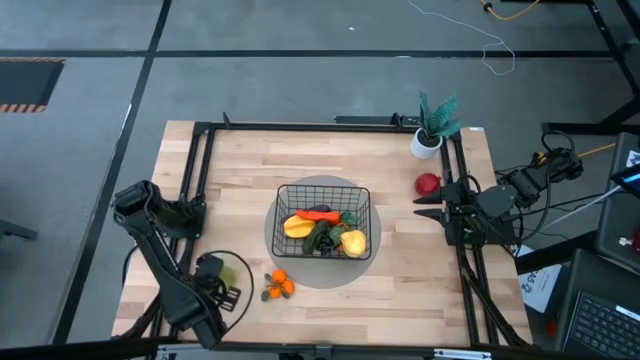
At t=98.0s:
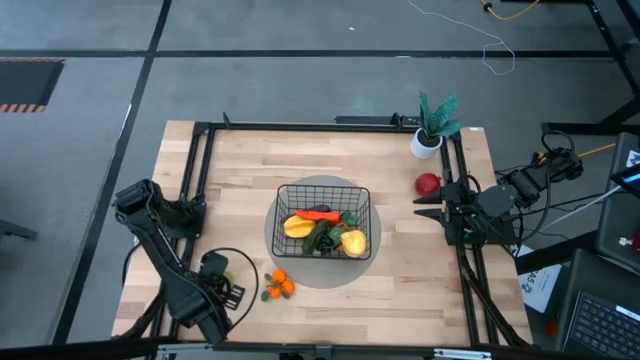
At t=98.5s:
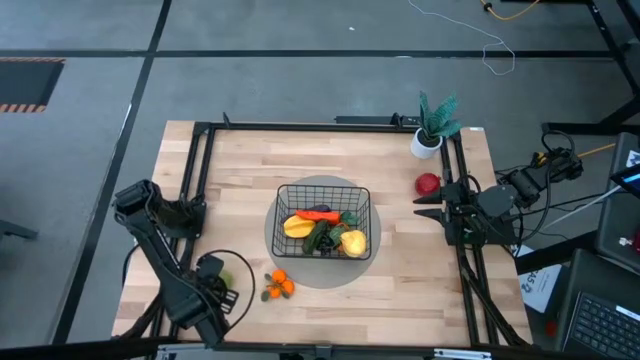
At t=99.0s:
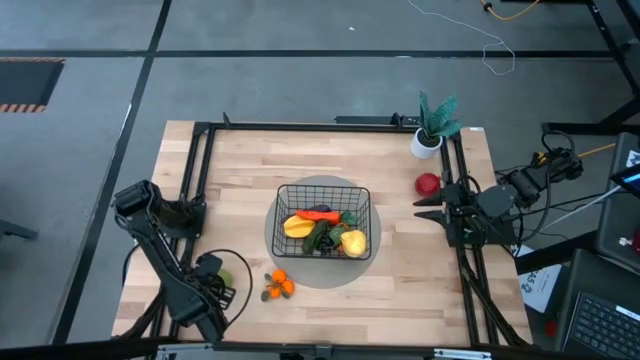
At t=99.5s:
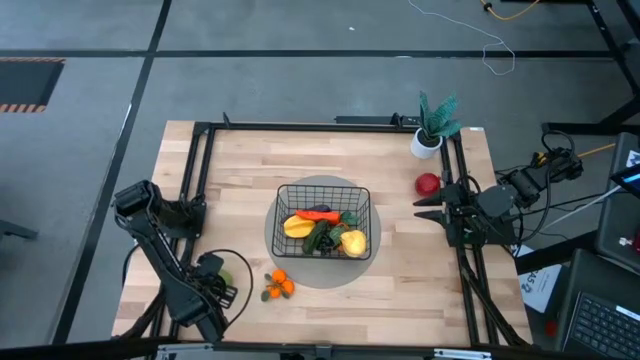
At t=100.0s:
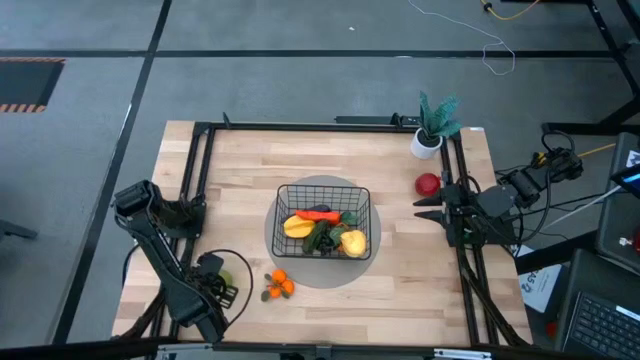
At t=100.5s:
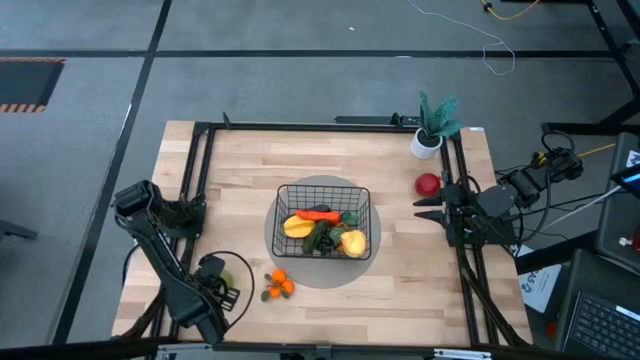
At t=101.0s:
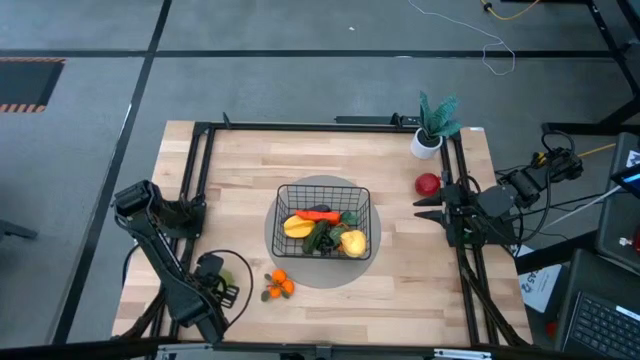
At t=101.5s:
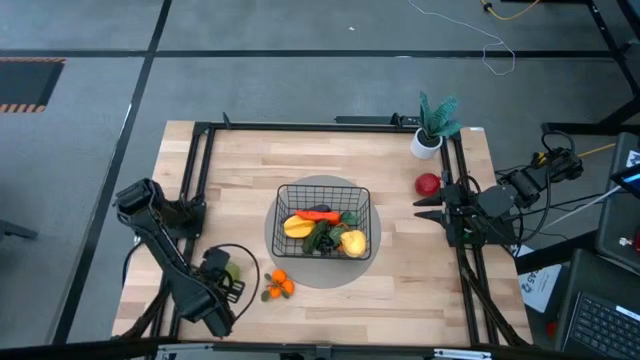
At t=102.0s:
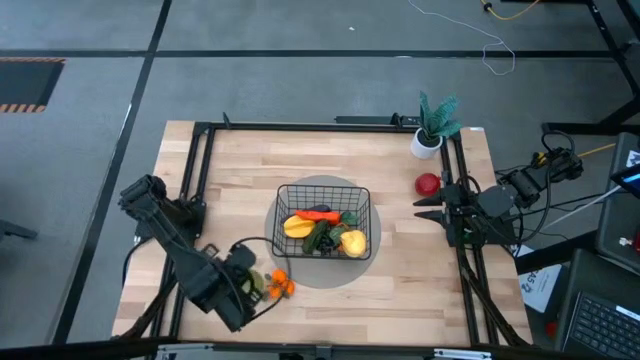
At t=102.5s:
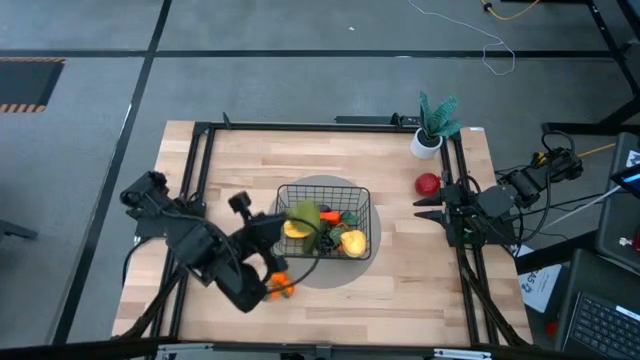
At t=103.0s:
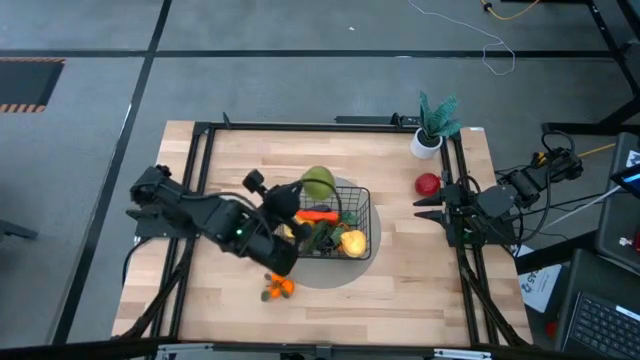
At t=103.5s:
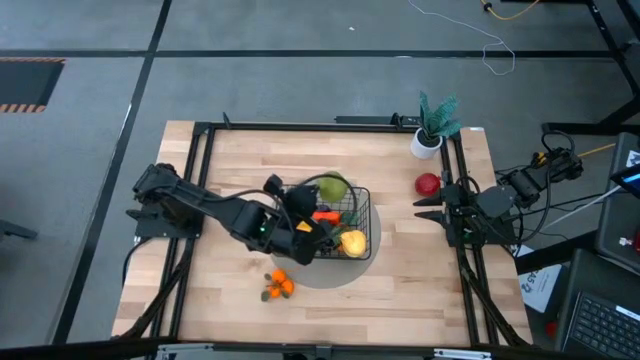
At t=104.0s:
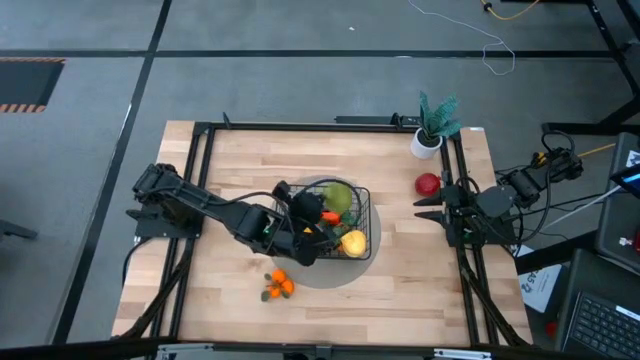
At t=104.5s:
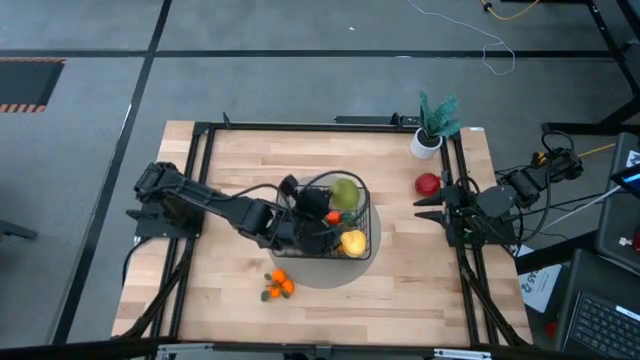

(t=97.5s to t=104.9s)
Task: Build produce basket
Put the green pear into the black wire basket

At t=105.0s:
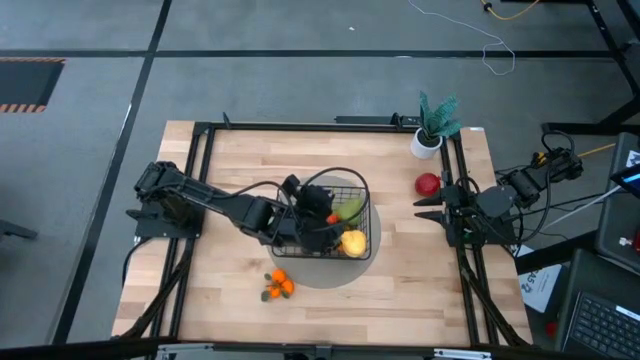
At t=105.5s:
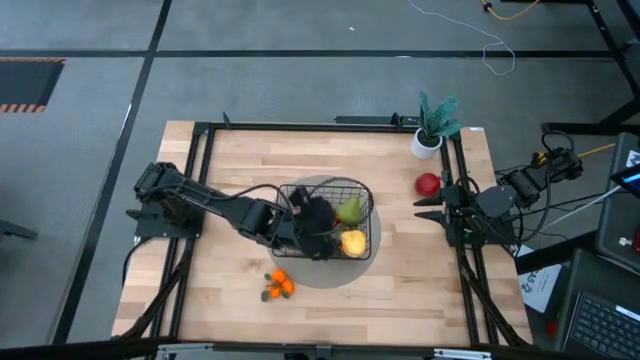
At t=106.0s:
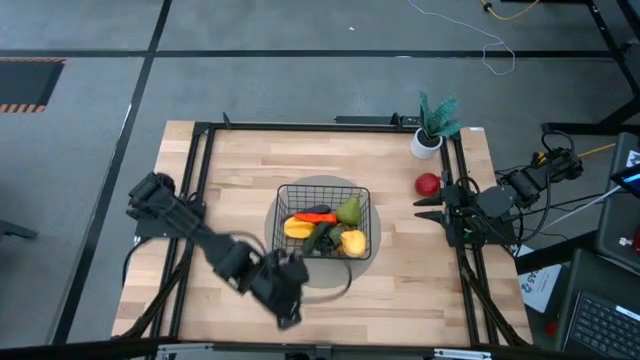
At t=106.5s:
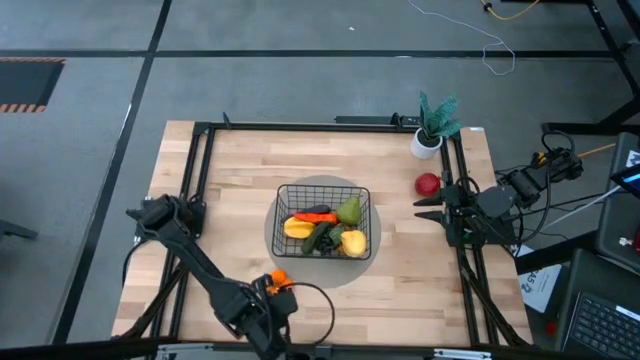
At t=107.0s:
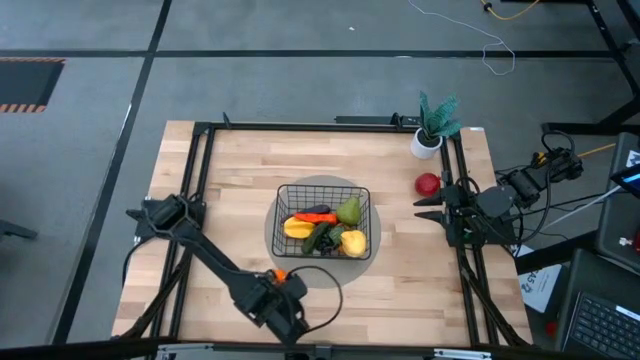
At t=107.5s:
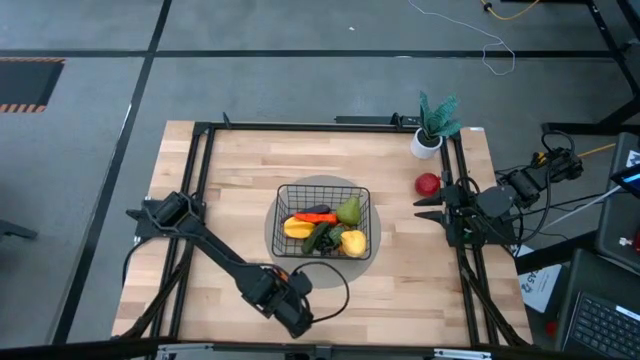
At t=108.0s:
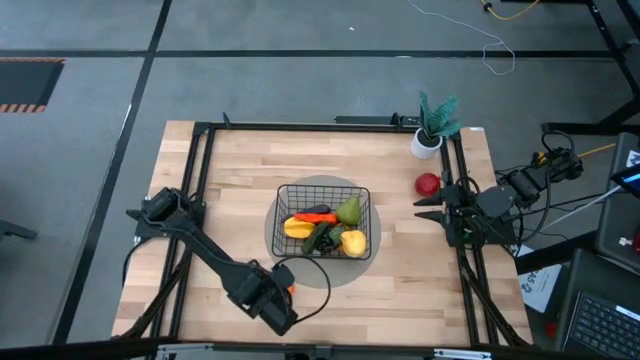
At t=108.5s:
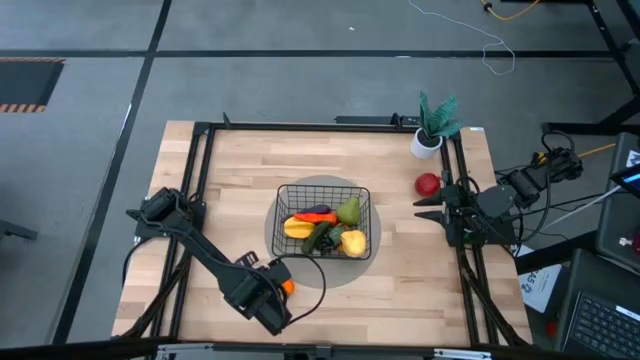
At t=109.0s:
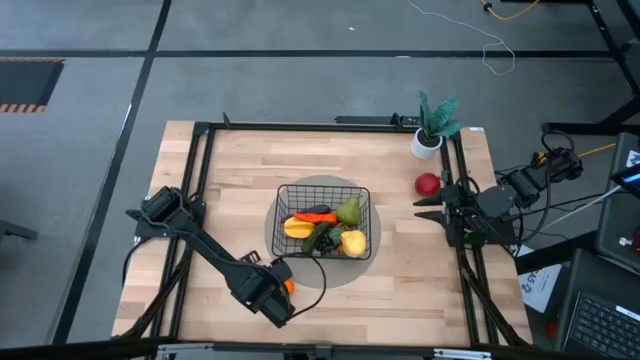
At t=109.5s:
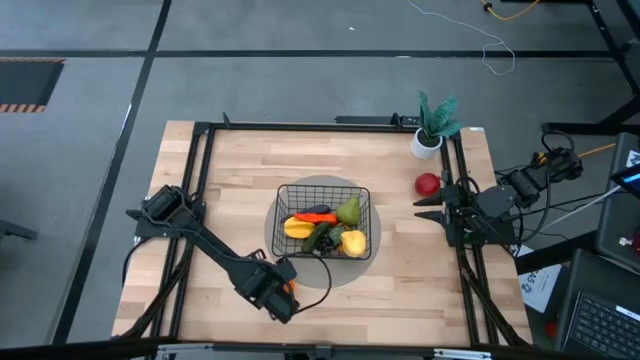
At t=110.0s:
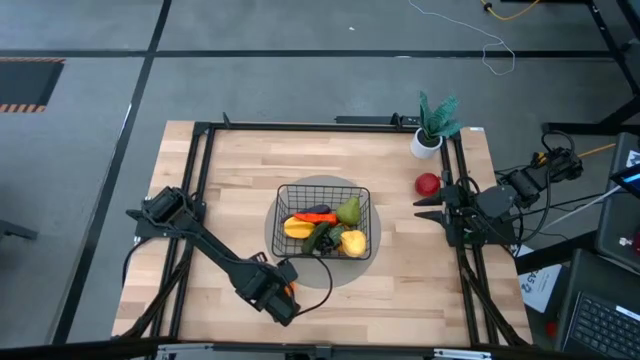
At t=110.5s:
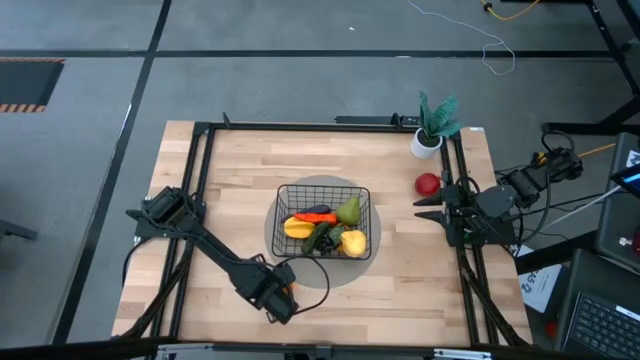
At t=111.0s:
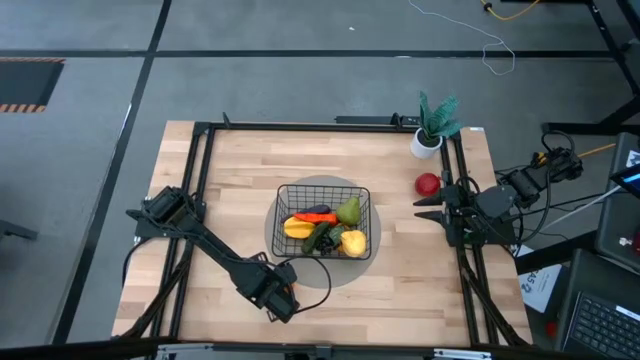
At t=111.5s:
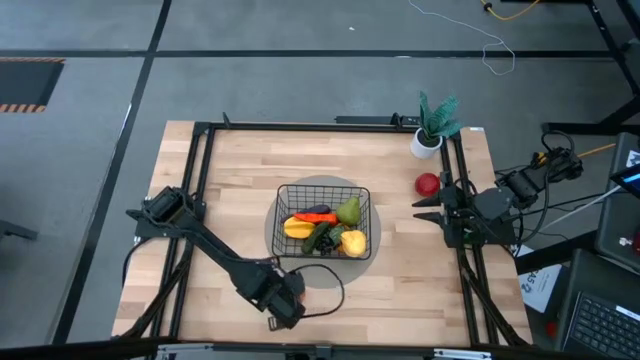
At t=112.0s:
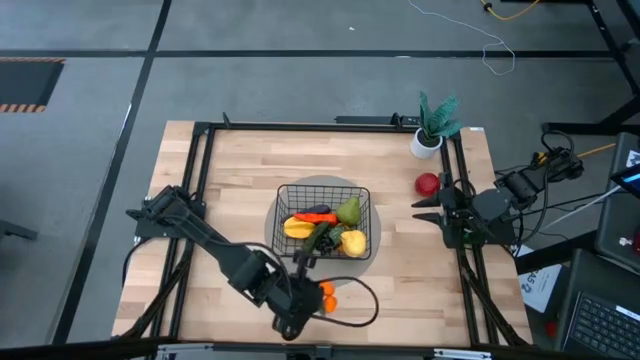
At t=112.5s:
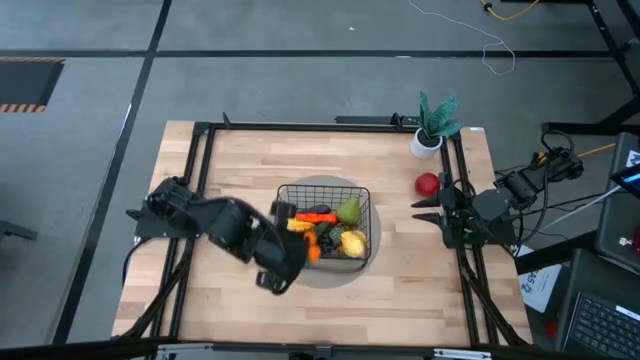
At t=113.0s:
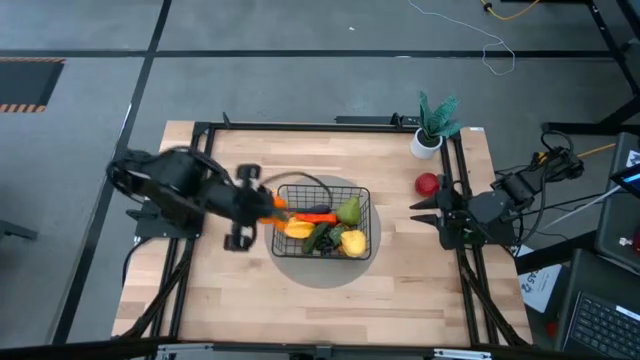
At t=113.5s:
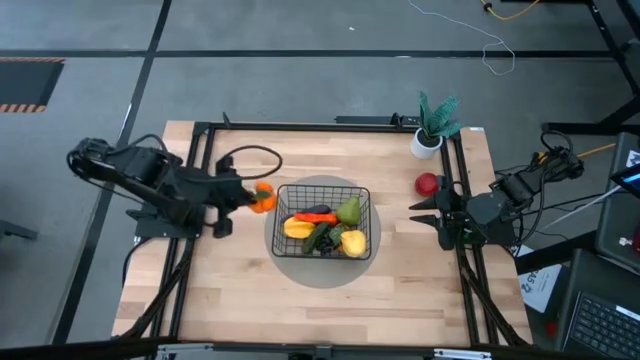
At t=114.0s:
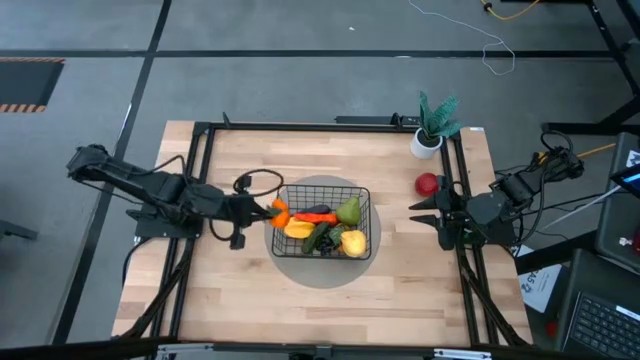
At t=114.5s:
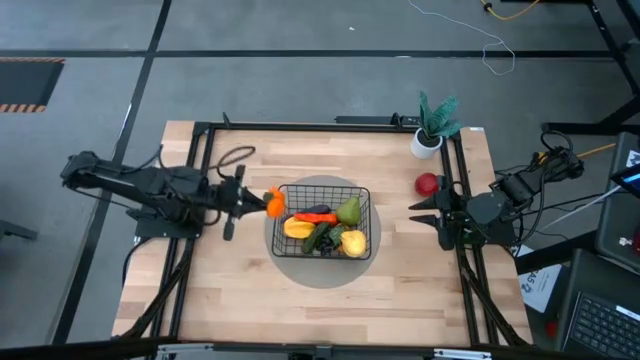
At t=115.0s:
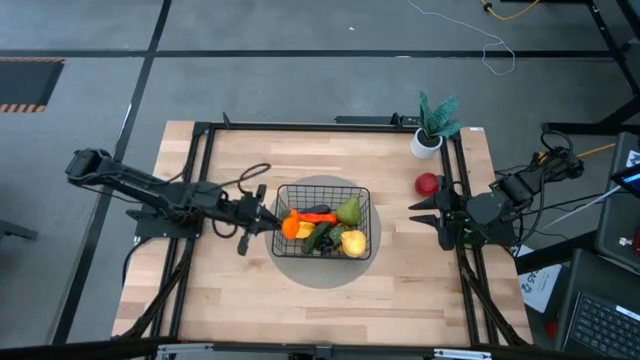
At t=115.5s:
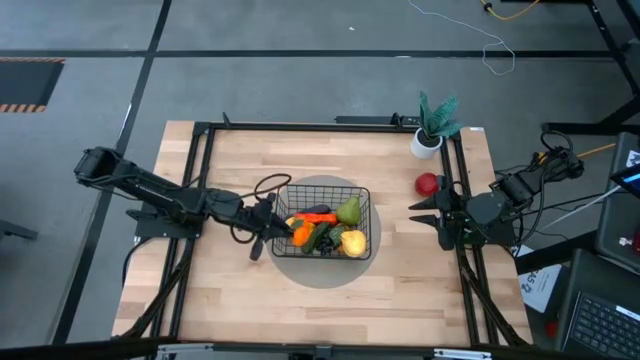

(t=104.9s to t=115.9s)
Put the tangerines into the black wire basket

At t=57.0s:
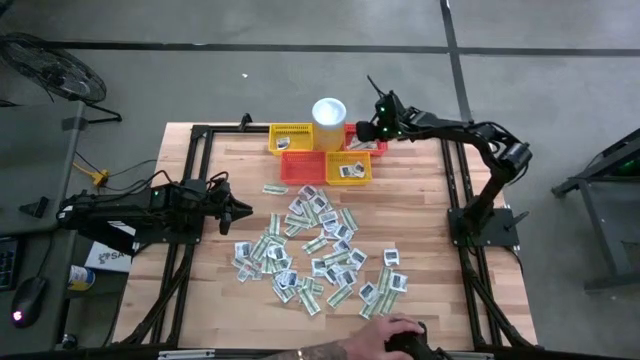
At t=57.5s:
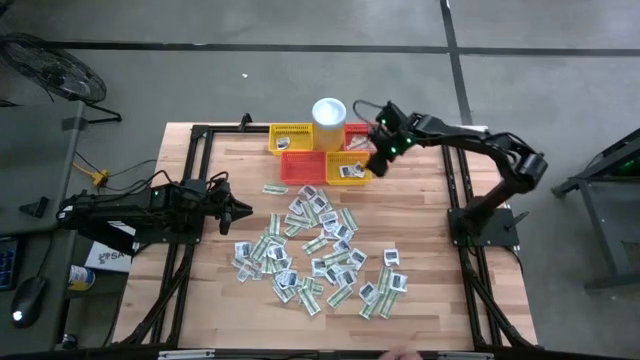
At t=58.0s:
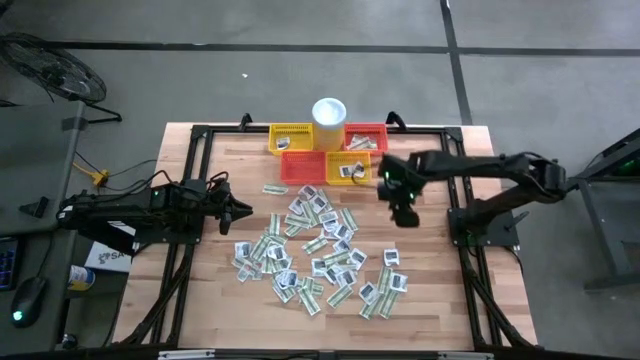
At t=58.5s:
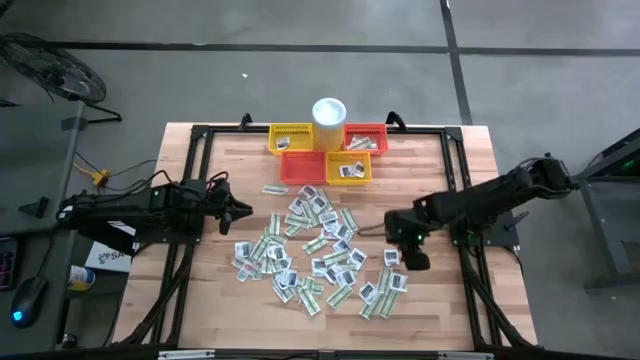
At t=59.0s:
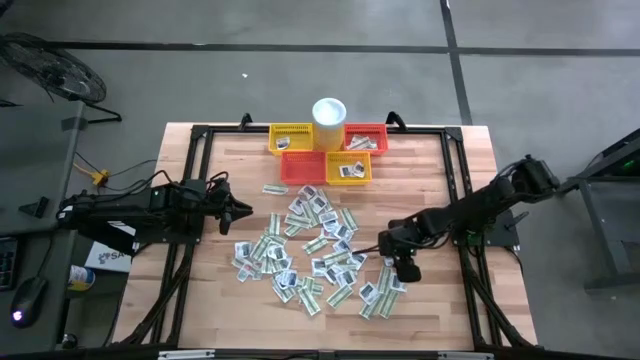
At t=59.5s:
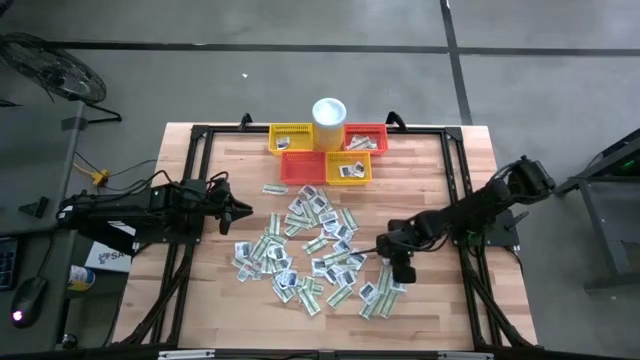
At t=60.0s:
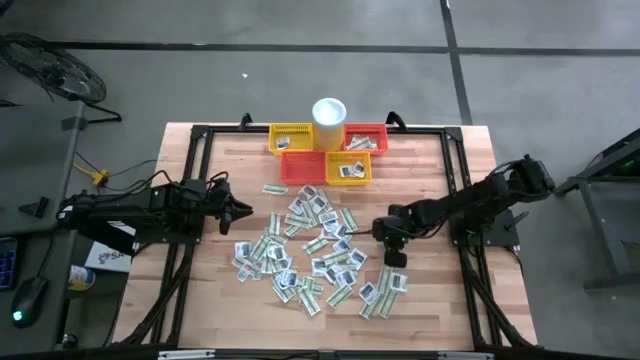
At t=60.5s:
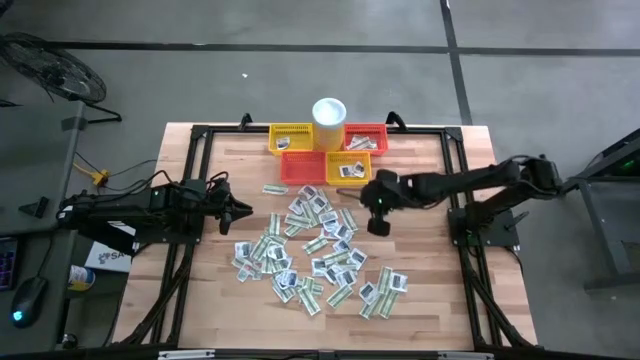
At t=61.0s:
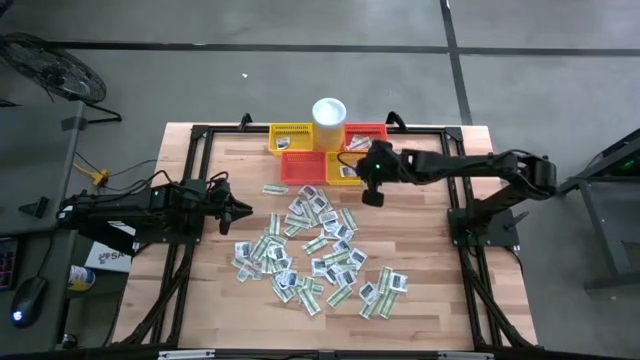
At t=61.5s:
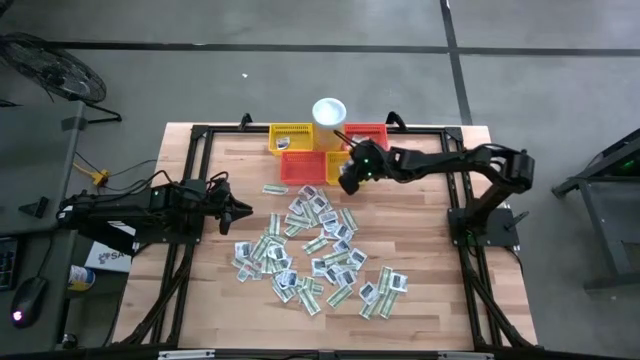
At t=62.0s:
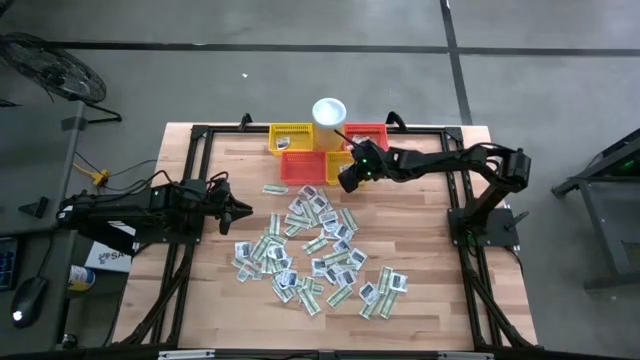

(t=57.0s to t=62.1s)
Task: Pick & Place First Aid Supplies
Put the black towelette pack into the bottom yellow basket
